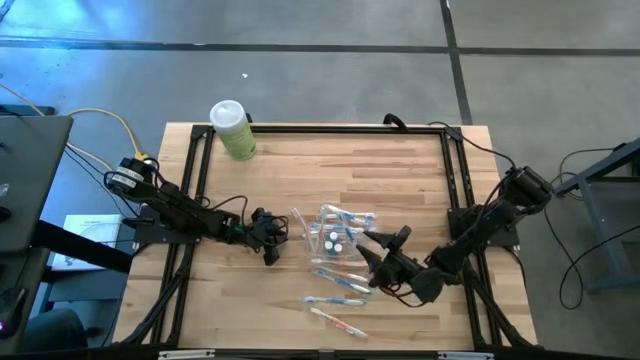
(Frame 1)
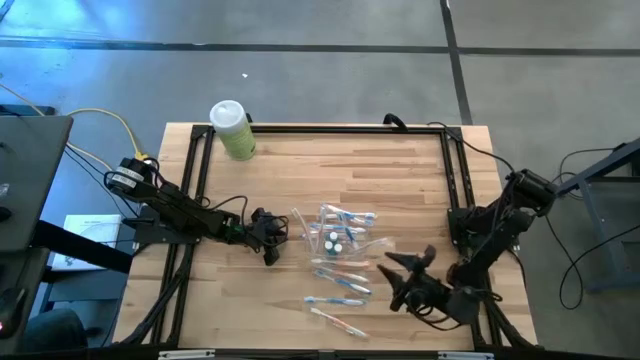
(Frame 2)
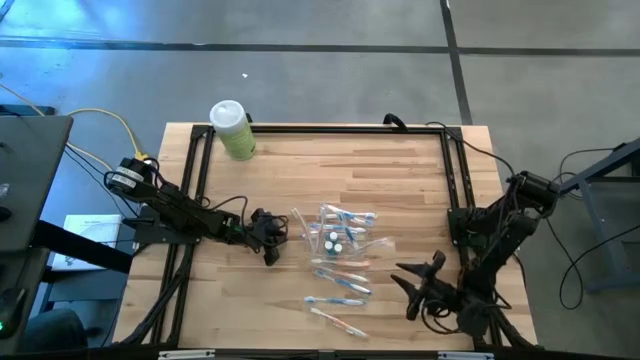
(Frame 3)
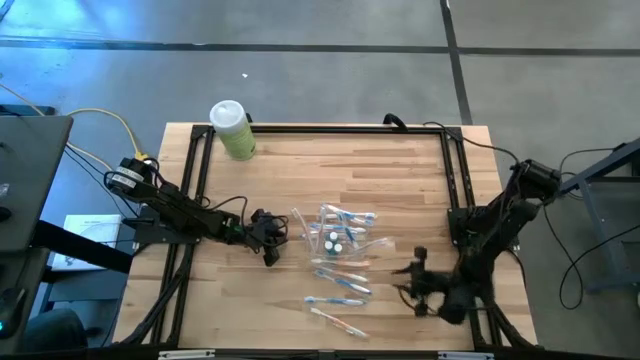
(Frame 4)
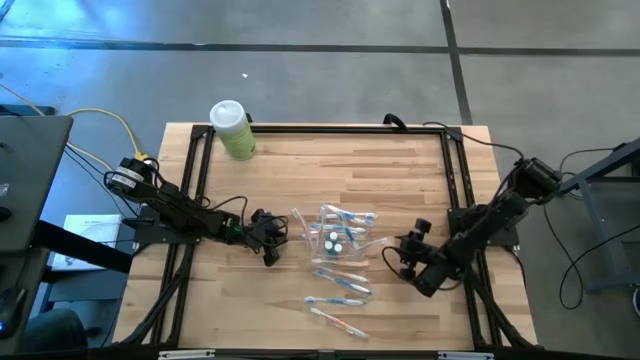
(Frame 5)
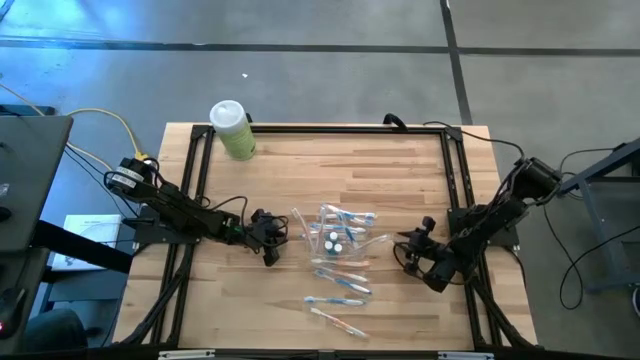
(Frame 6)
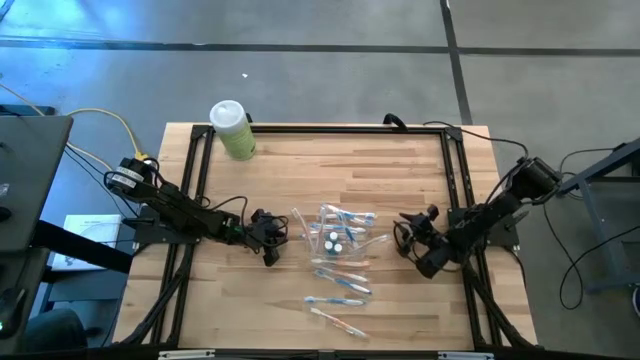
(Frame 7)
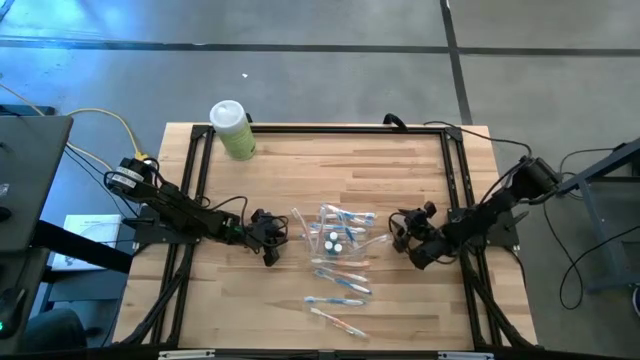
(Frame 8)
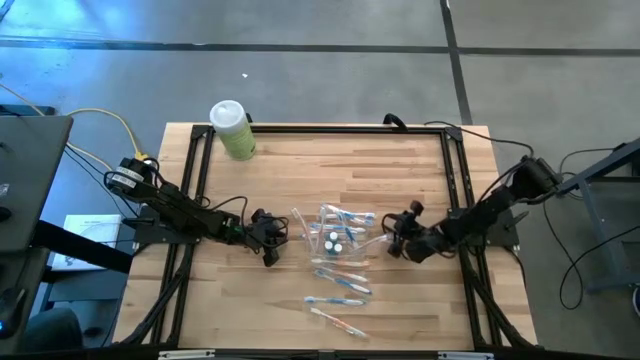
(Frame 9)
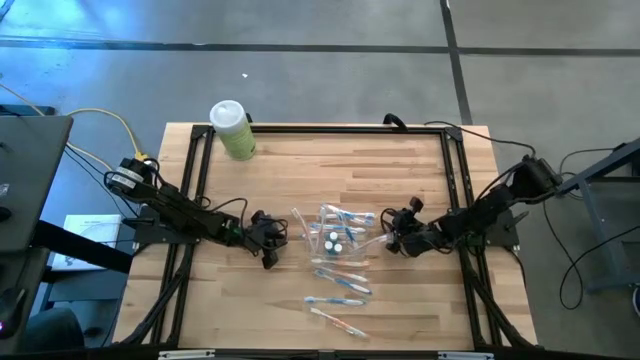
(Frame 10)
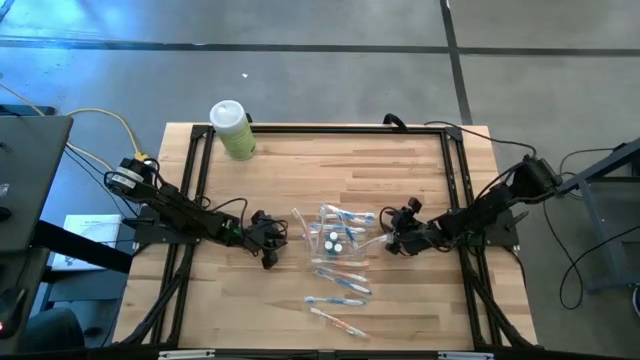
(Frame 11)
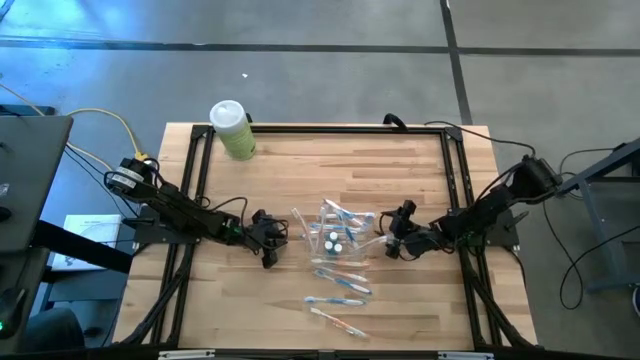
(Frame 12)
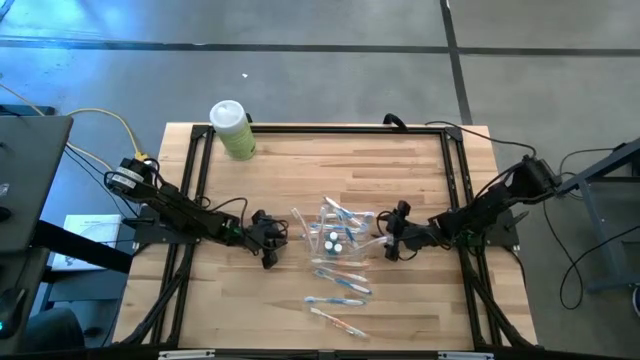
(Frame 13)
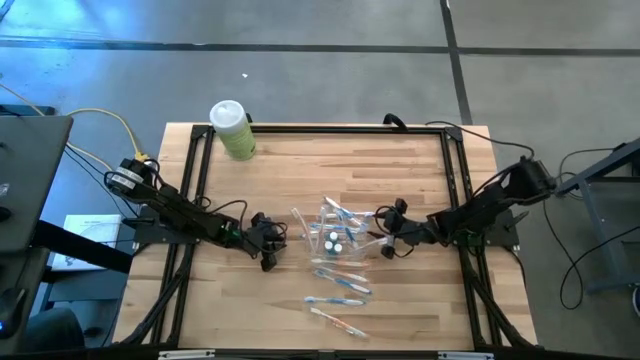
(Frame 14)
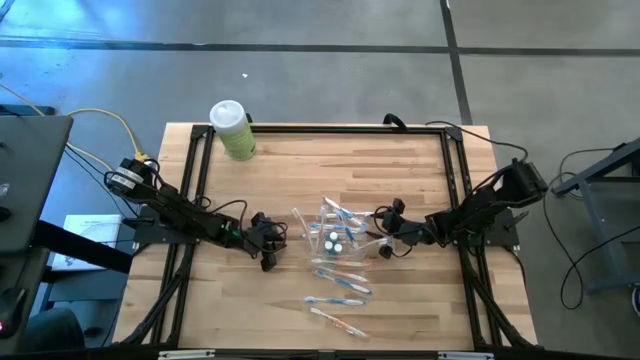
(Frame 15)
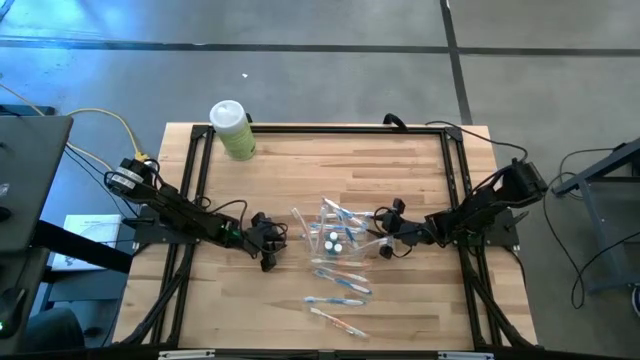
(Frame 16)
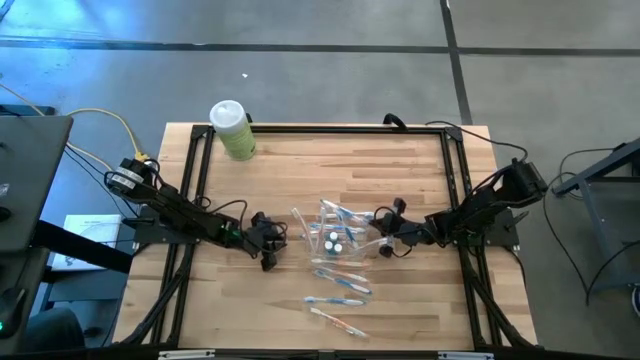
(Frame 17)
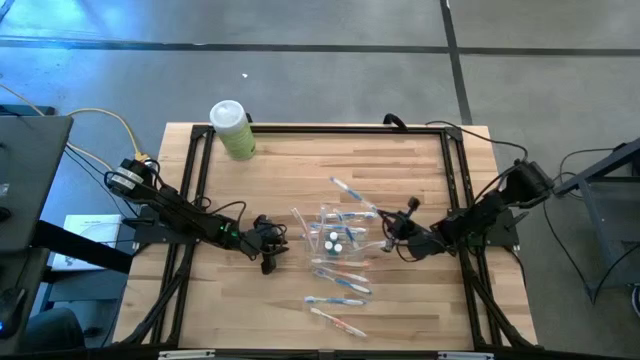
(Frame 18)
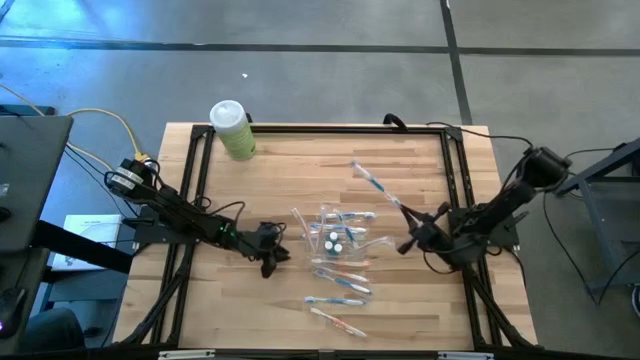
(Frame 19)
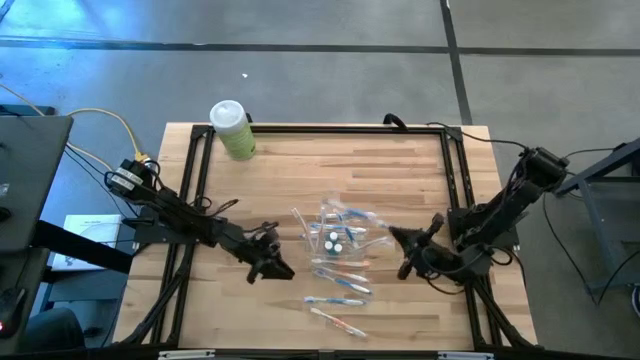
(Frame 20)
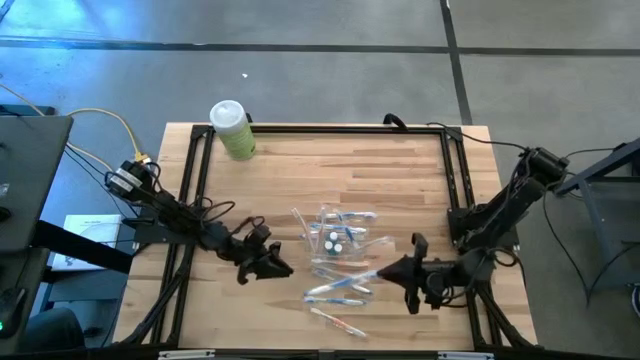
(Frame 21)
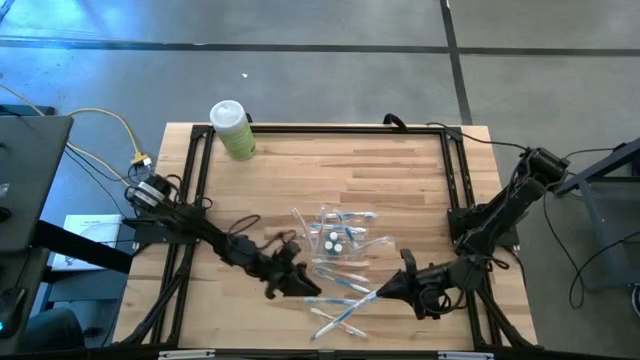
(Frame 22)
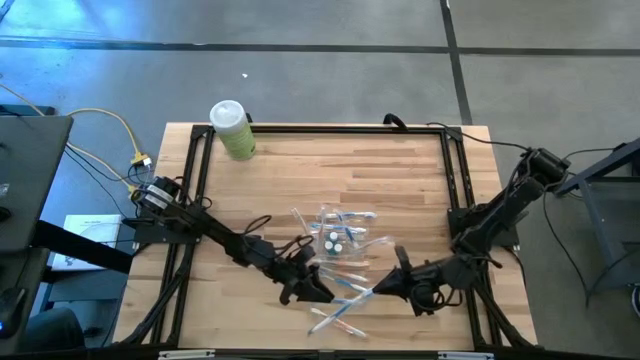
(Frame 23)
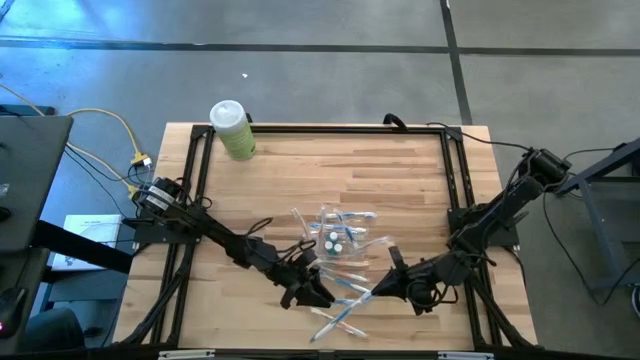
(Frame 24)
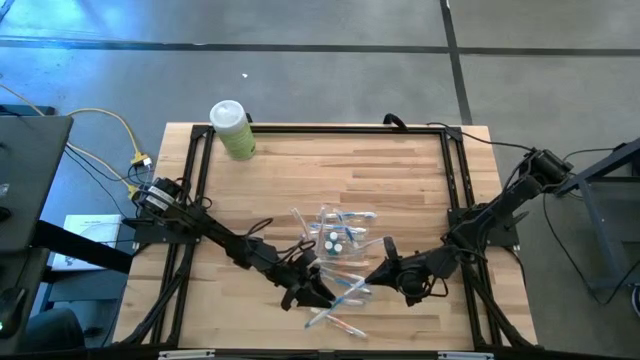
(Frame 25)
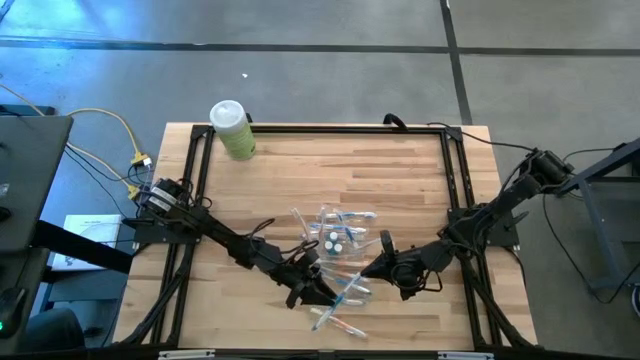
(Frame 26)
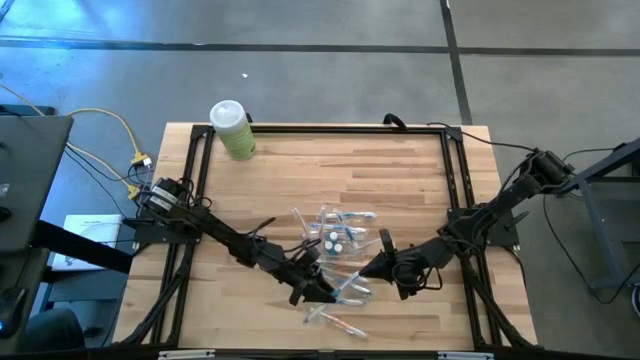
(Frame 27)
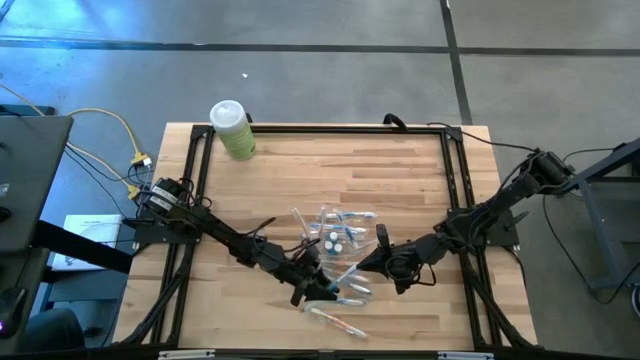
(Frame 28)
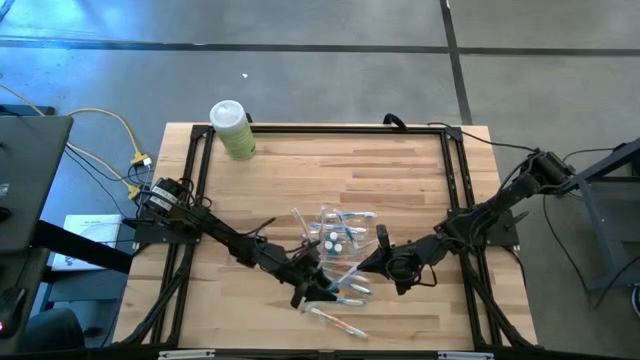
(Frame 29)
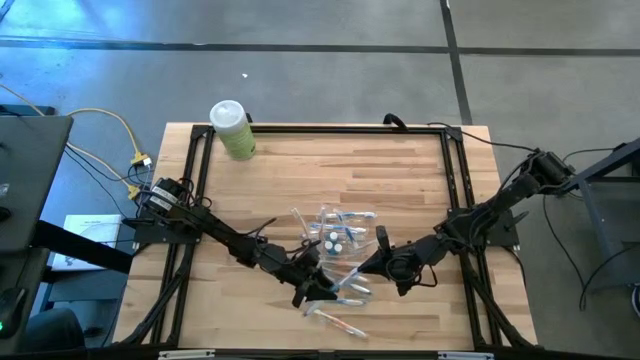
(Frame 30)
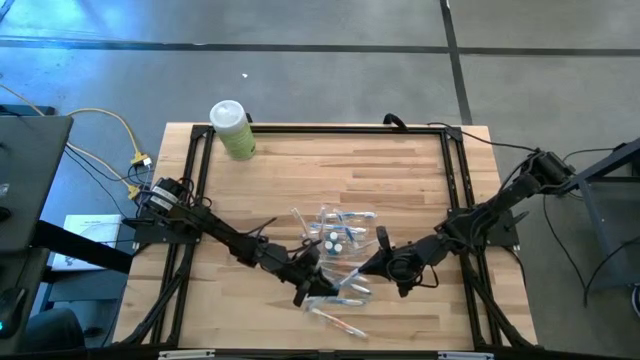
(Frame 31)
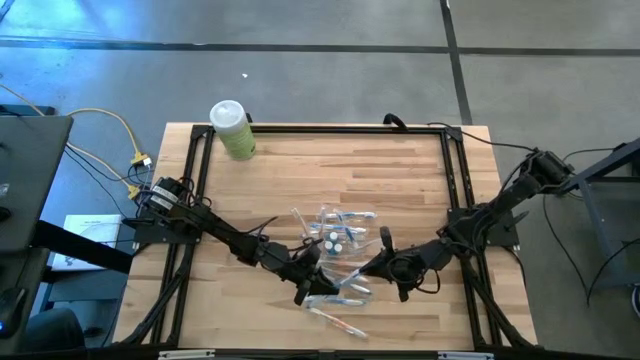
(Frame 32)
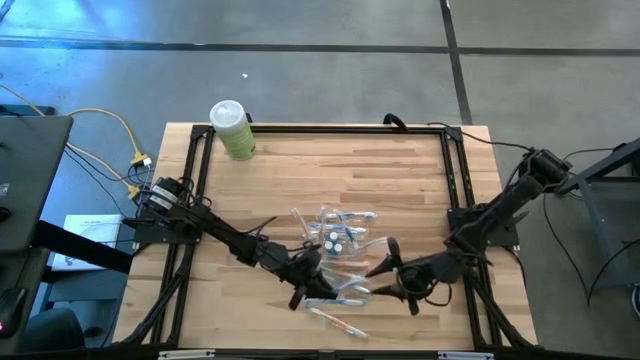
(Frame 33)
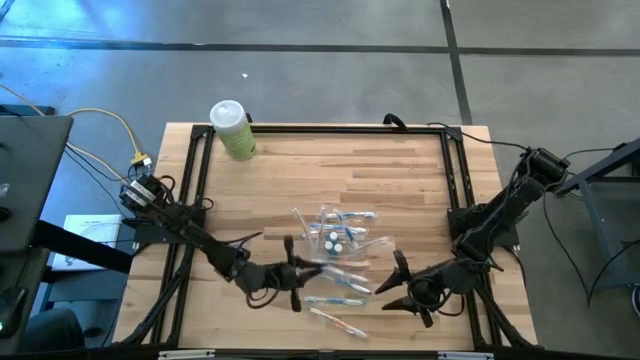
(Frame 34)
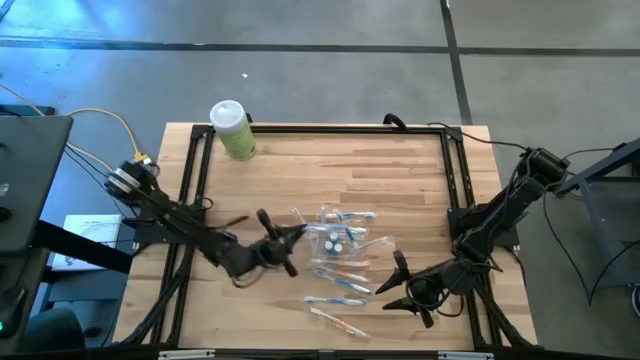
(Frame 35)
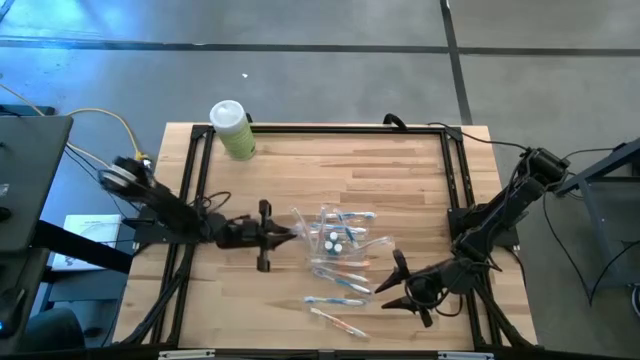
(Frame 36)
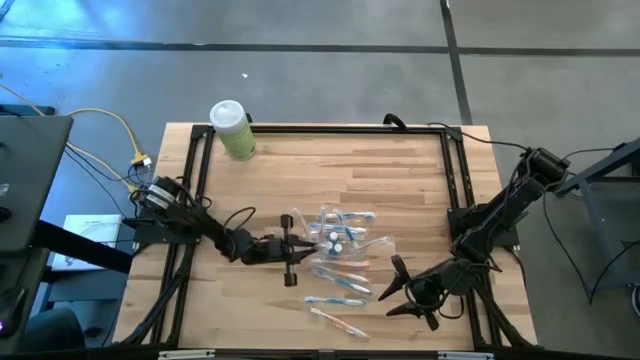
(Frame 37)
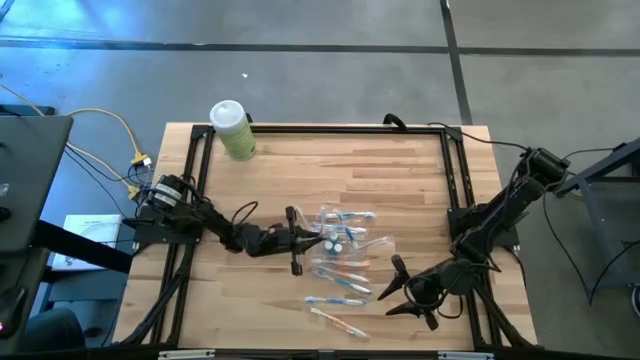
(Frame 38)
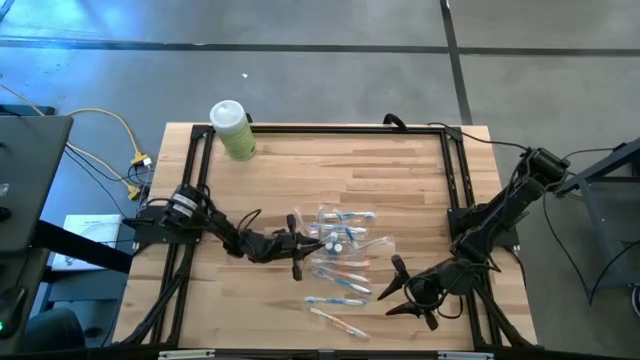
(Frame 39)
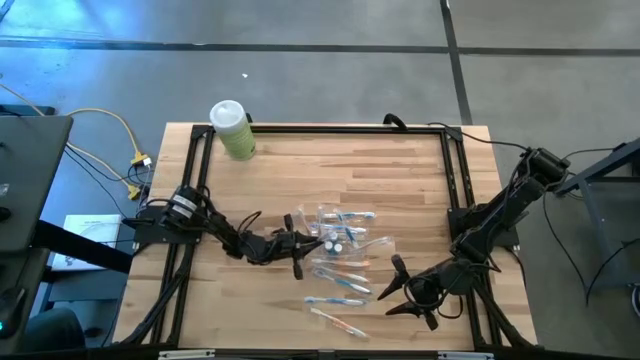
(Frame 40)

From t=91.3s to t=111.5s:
Task: Pick & Place toothbrushing station
Put the blue toothbrush into the transparent organizer

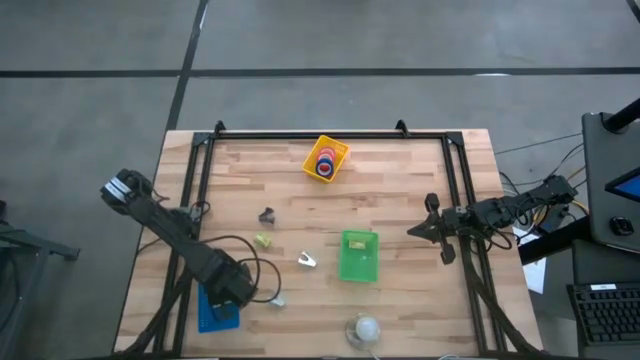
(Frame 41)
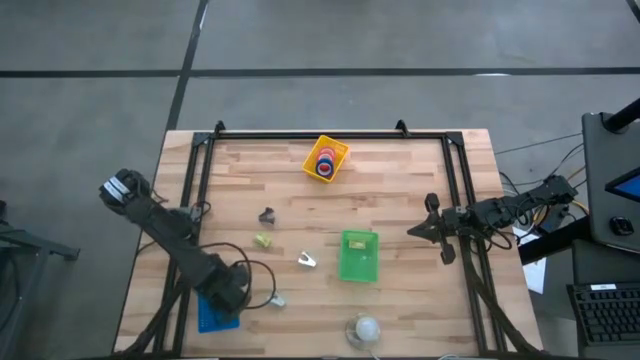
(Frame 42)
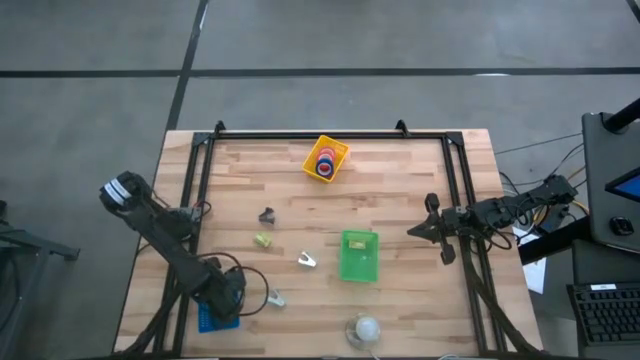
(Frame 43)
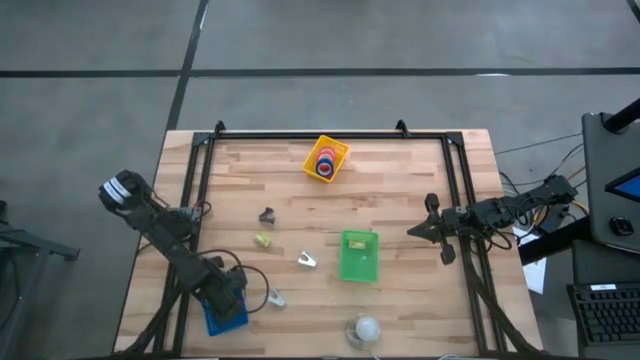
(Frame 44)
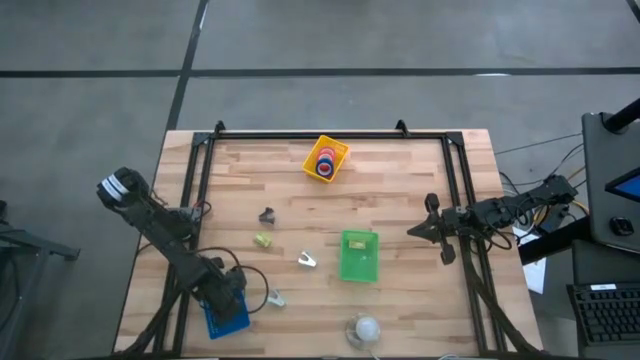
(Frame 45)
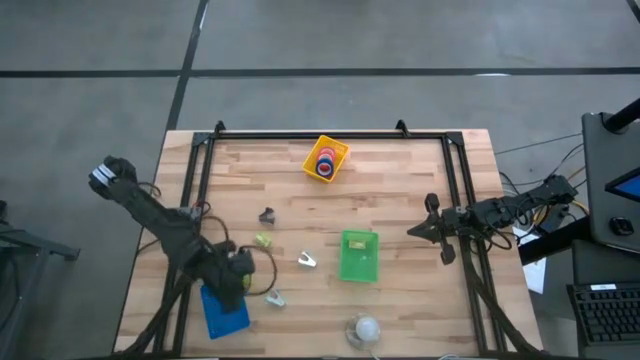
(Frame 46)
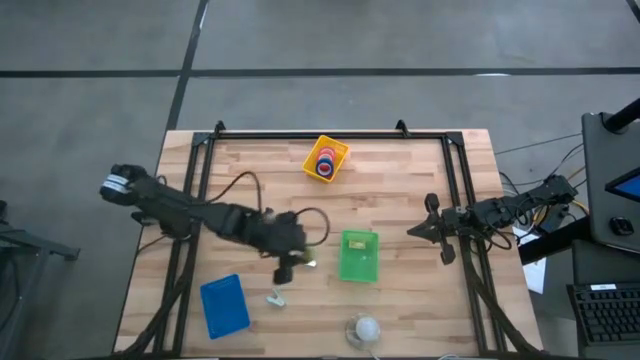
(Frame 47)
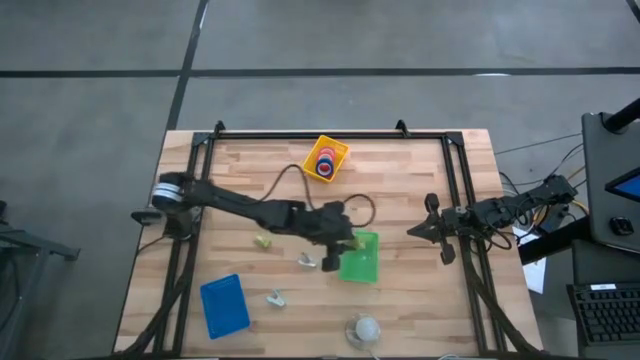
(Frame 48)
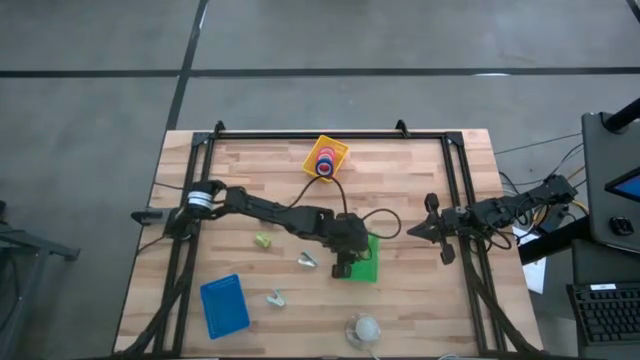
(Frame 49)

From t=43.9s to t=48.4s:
Task: Pick and place Stapler, Stapler remover, tape
Put the top green staple box into the green bin
